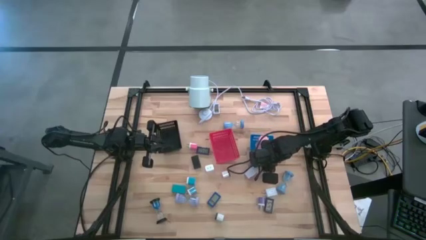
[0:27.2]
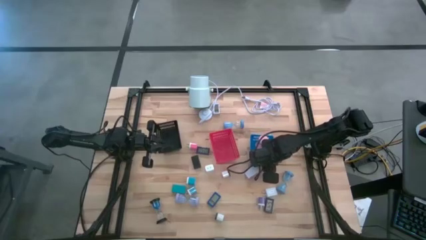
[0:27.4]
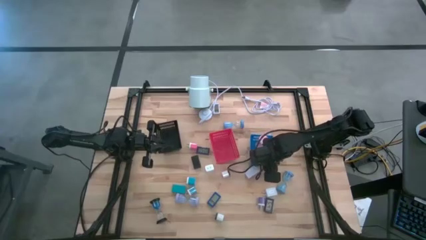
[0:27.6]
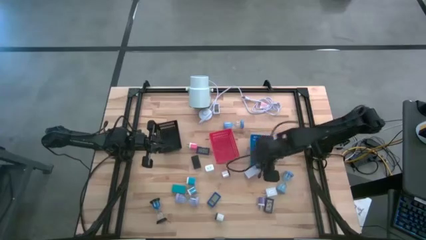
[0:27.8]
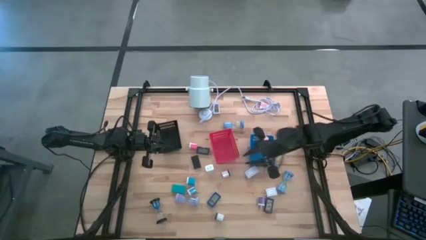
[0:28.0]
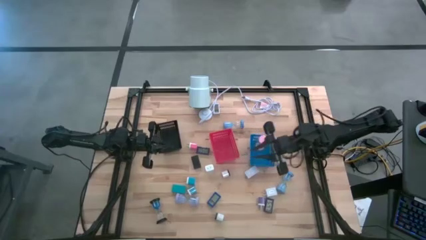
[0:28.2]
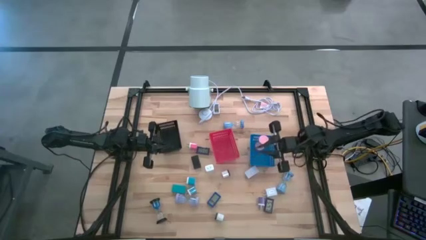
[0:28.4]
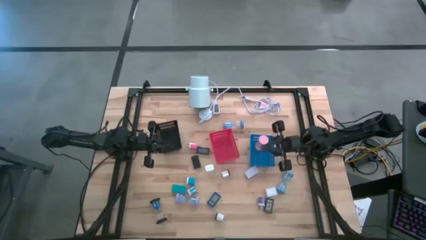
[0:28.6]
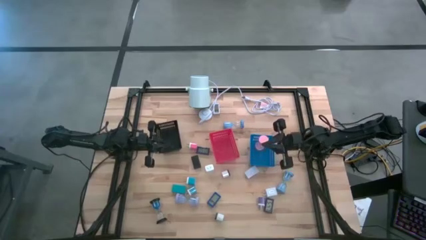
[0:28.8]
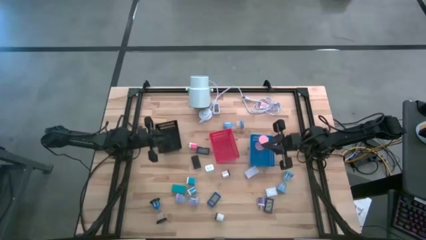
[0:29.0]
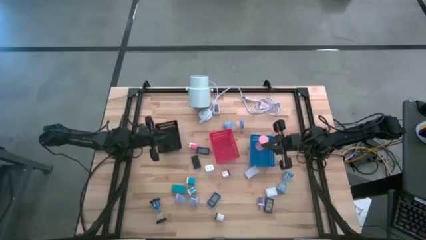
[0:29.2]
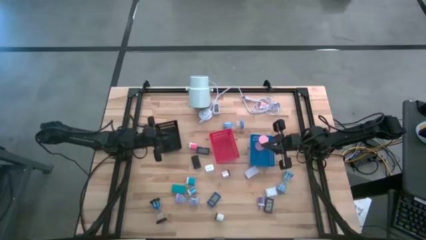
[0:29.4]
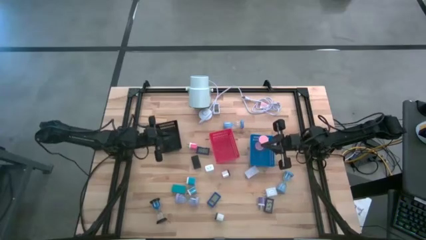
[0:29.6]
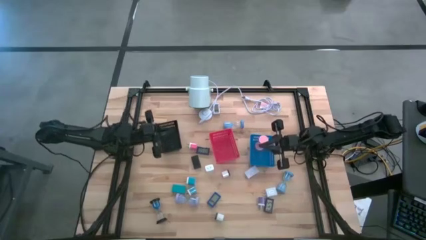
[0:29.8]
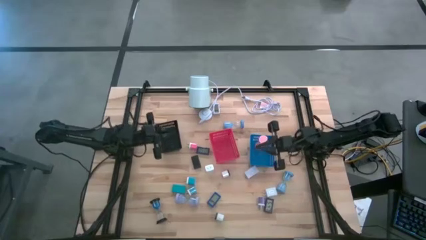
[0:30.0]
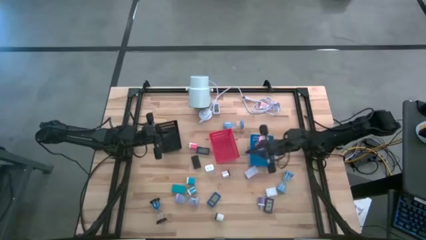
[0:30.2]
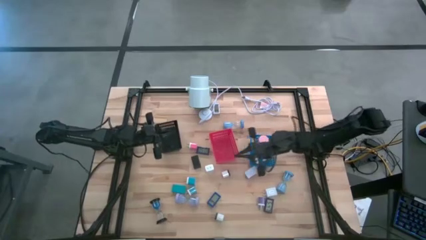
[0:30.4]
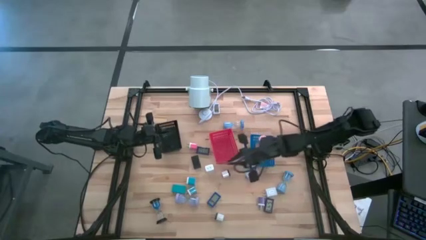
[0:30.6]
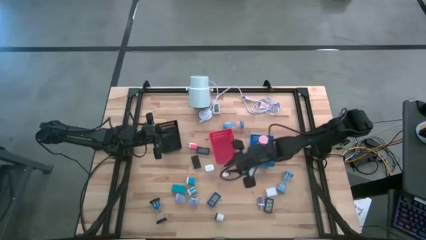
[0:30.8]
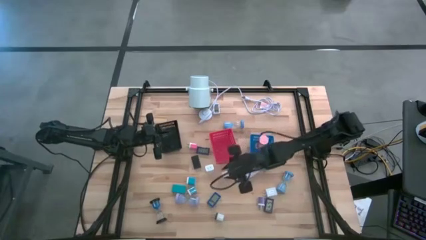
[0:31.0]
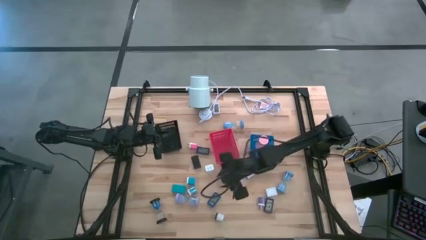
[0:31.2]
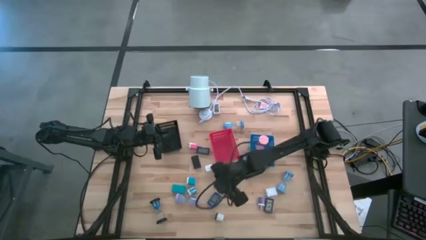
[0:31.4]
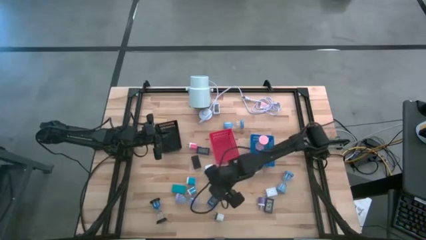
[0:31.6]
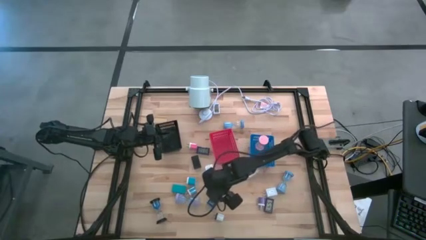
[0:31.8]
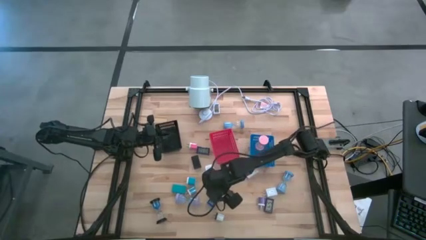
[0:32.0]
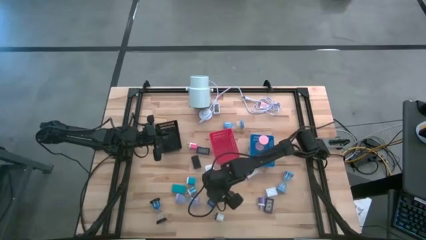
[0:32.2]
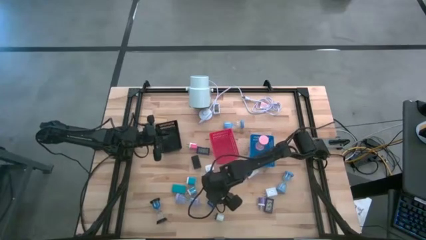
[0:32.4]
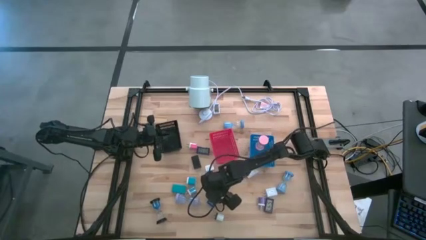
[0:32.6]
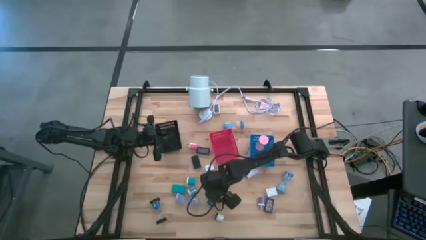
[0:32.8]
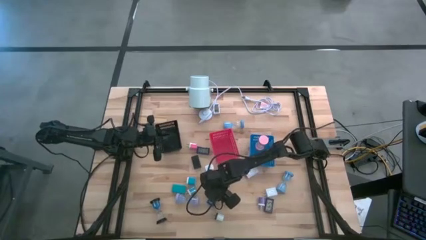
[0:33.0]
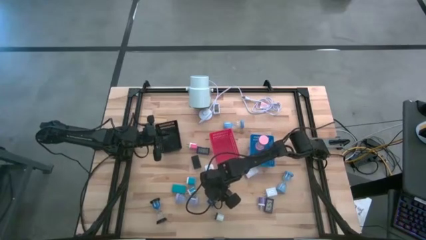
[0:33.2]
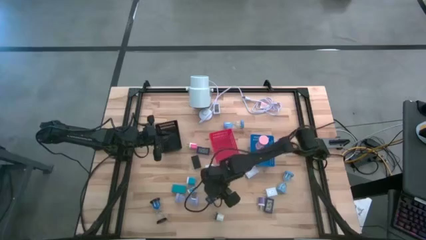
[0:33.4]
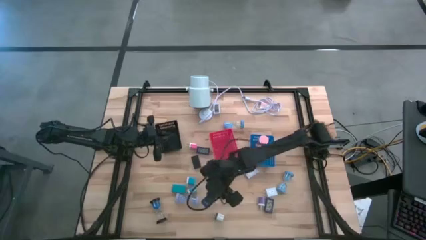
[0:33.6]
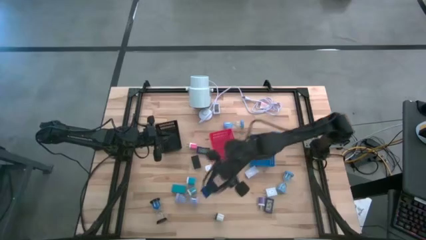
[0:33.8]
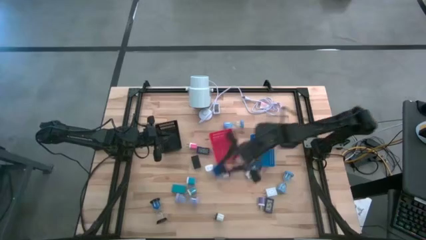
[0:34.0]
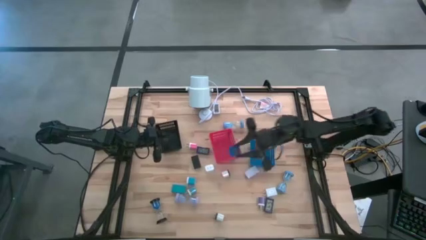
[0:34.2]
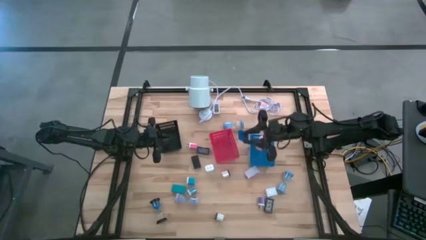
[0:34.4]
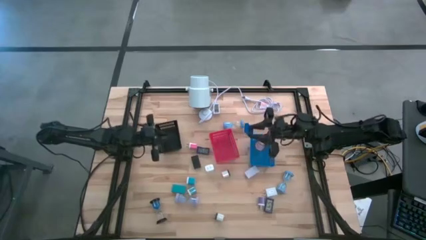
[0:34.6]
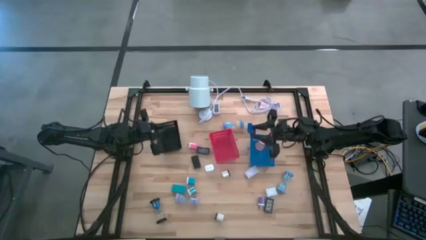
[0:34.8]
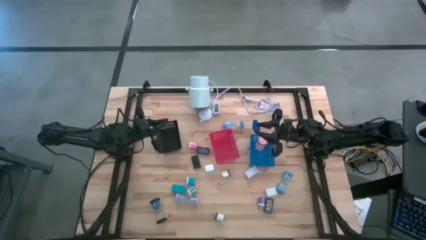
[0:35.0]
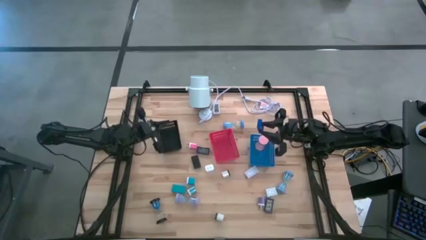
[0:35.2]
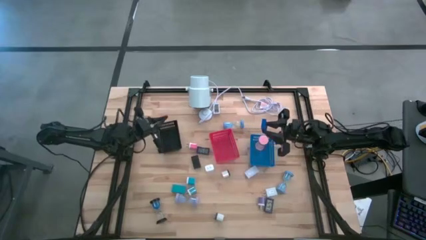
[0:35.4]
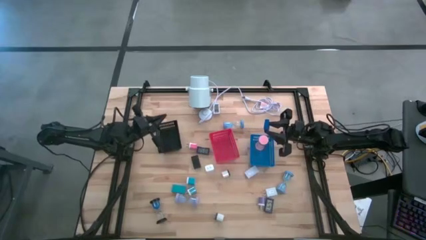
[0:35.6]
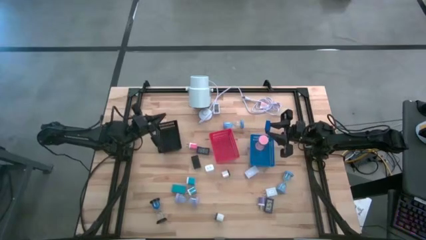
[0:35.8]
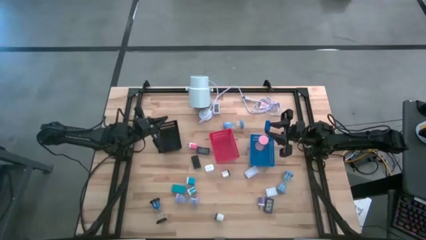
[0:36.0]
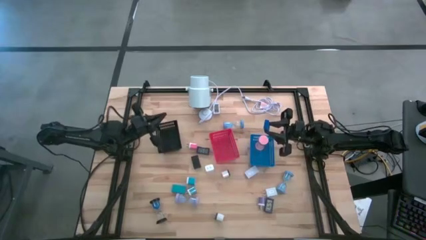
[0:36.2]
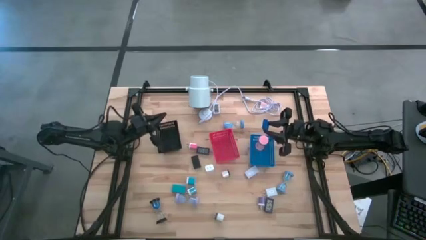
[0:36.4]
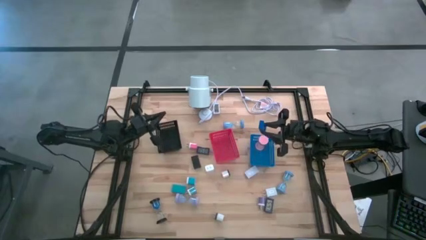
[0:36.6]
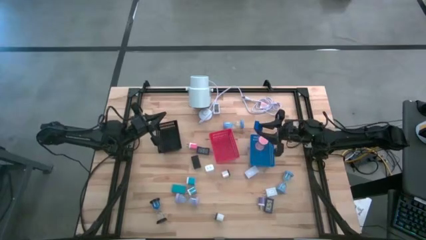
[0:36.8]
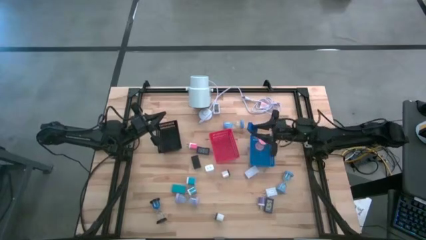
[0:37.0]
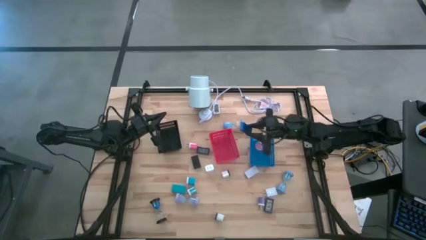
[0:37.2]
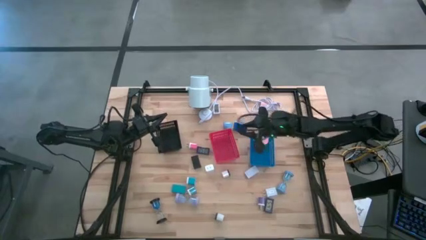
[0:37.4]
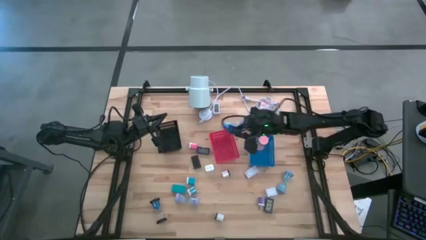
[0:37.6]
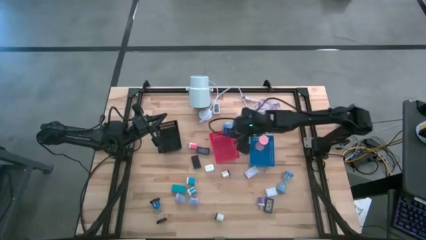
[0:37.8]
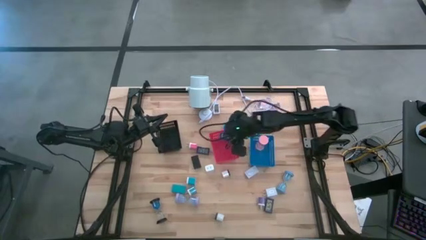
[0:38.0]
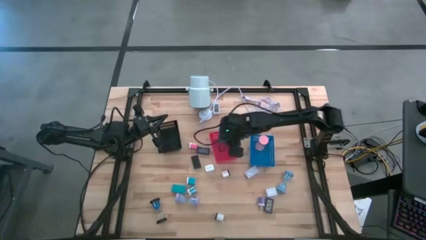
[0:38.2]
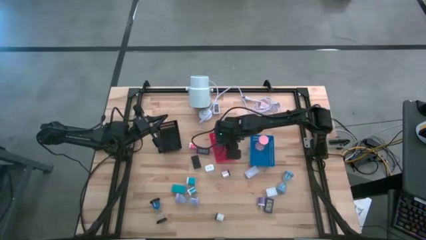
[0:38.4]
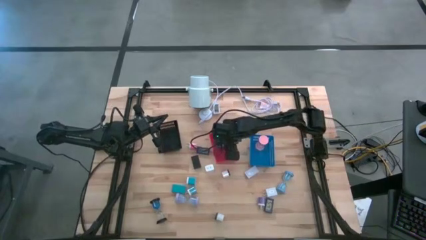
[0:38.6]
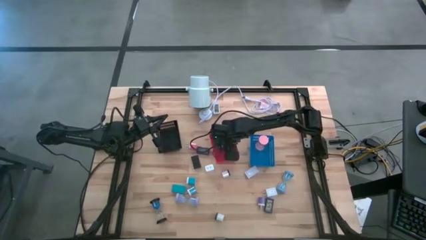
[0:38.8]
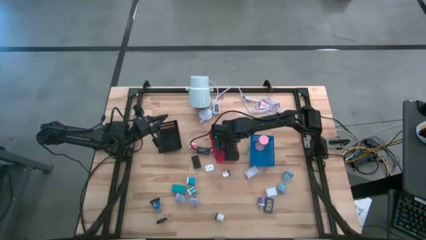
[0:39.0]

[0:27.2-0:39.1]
Task: Pick & Place Office items
Put the middle blue digital clock into the red bin

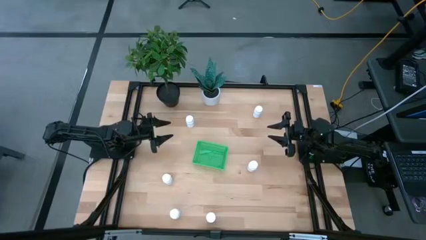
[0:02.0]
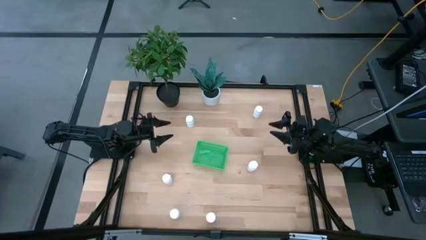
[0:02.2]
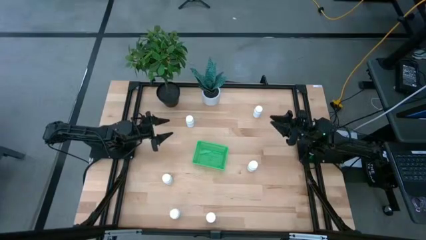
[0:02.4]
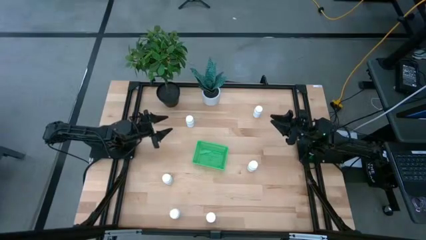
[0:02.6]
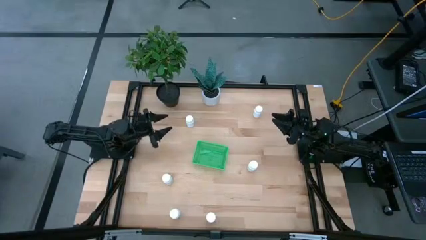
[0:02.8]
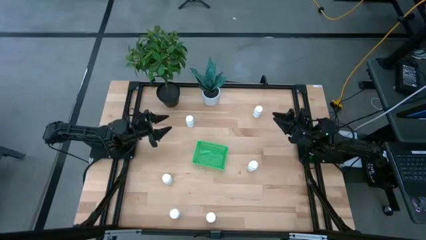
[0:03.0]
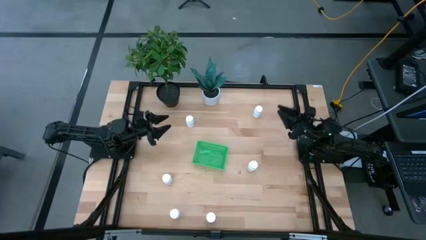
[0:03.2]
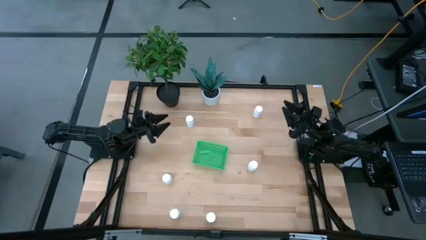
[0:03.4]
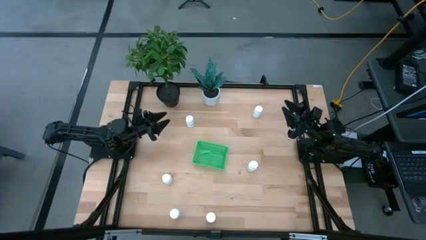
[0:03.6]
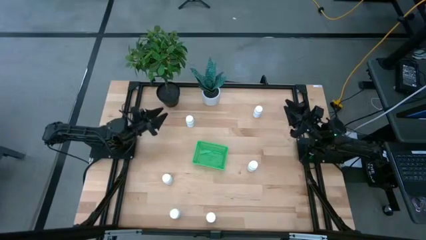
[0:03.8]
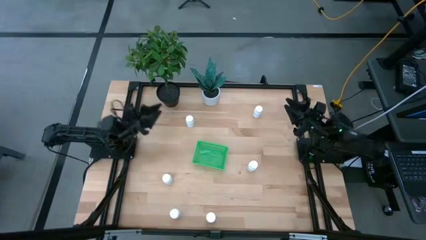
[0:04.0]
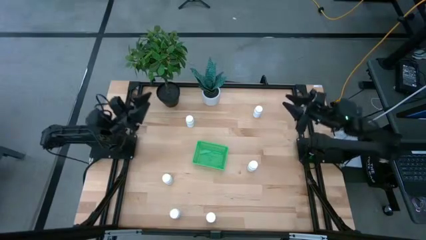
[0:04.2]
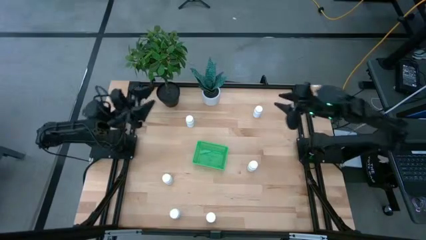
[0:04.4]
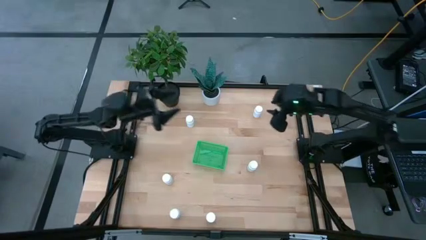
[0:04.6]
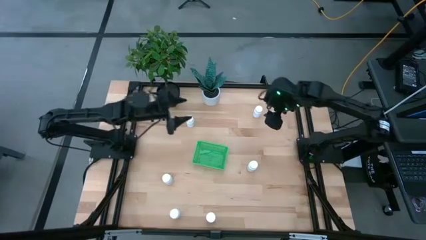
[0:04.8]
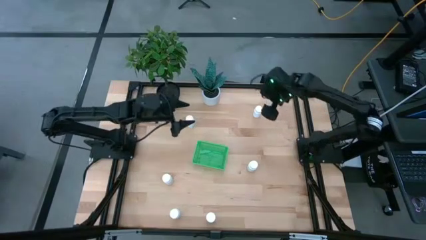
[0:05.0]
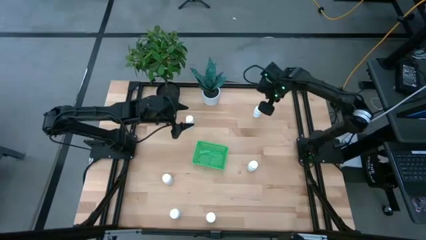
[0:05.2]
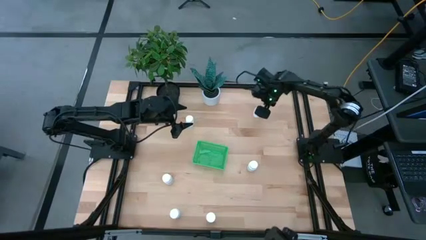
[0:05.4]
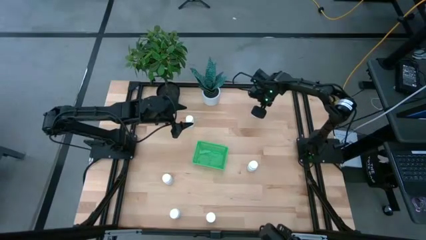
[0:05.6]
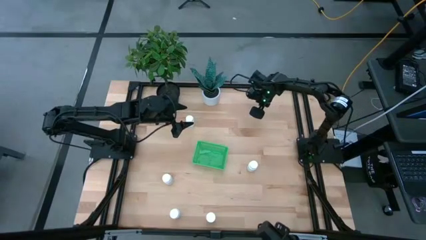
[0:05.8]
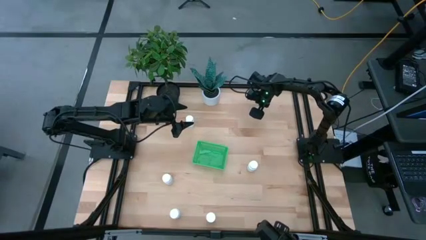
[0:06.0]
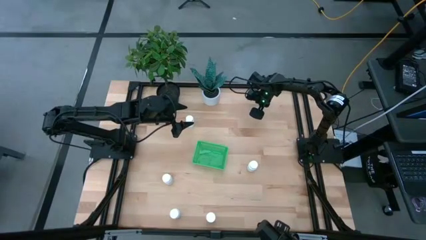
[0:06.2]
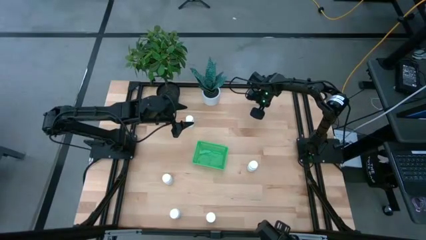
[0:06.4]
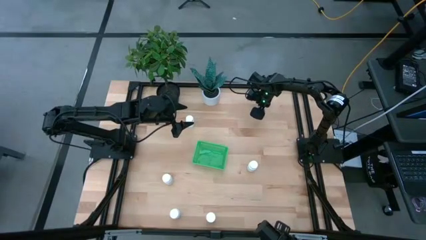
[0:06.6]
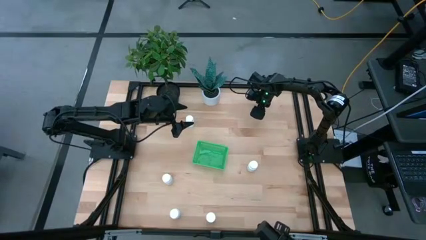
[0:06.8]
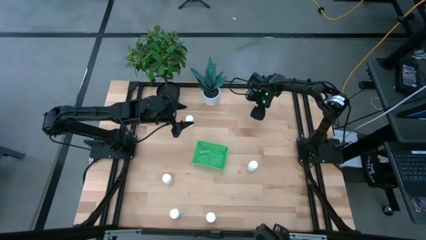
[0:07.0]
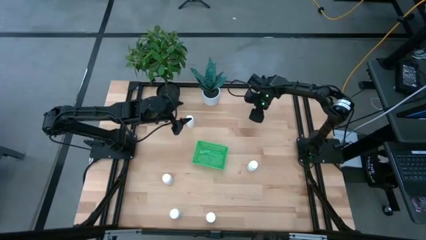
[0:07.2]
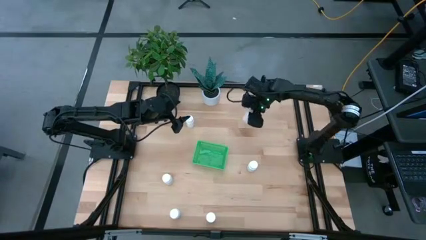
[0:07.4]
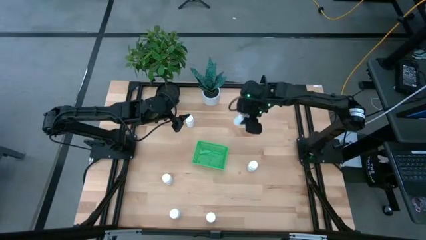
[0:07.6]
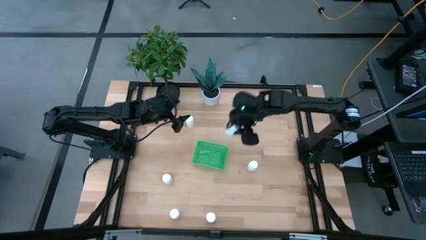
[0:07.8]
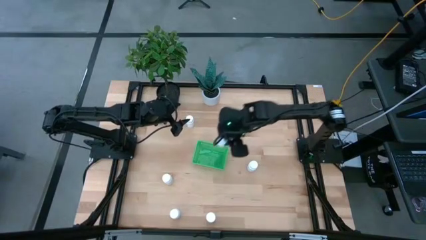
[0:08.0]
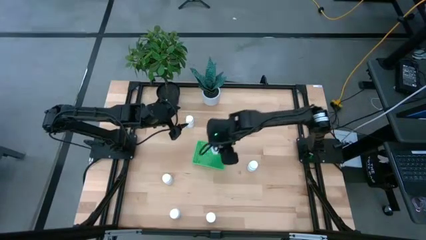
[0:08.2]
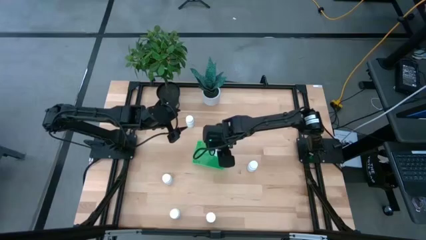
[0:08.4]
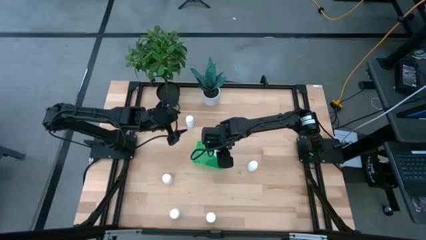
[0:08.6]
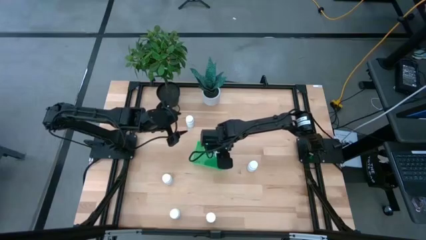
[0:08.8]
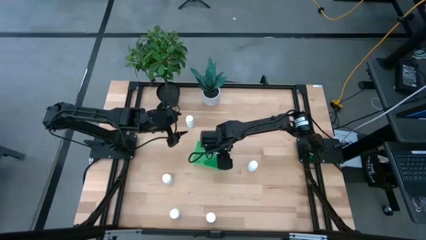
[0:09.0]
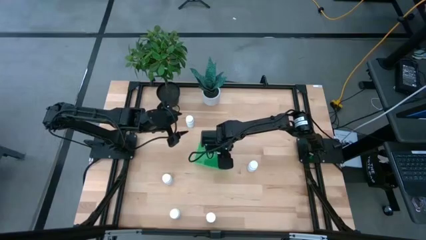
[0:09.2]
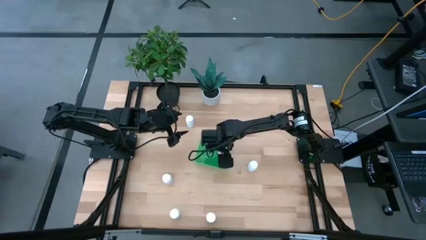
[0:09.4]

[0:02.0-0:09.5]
Task: Pick and place pill bottles into a basket
Put the pill bottle into the bin
